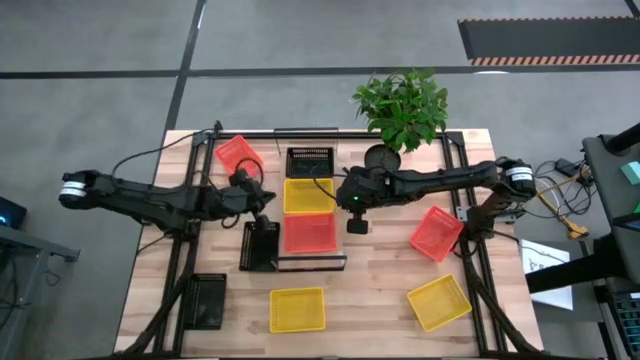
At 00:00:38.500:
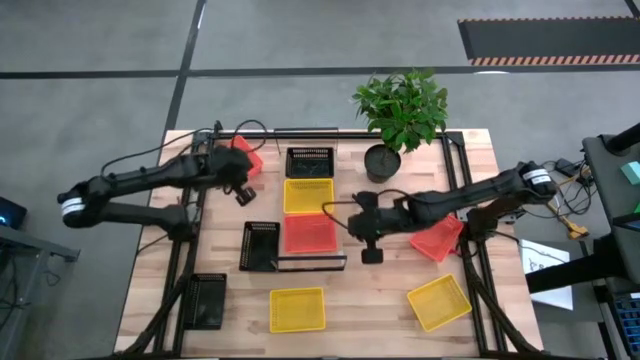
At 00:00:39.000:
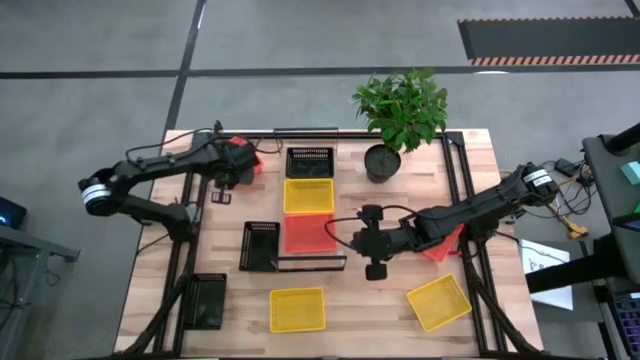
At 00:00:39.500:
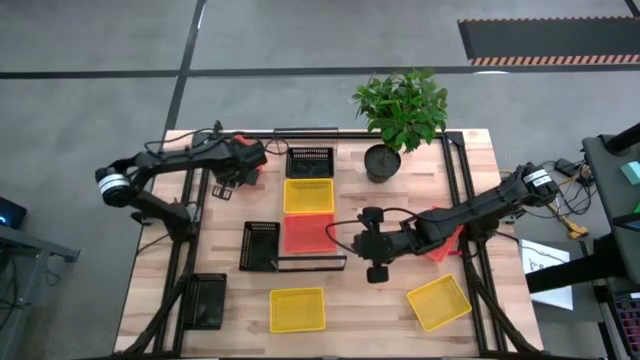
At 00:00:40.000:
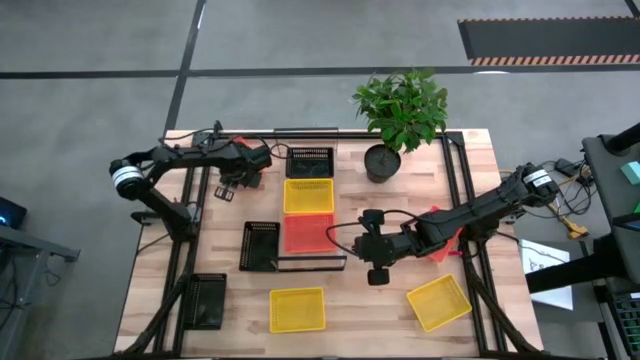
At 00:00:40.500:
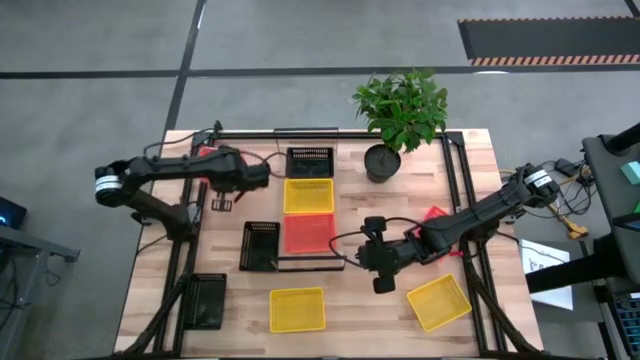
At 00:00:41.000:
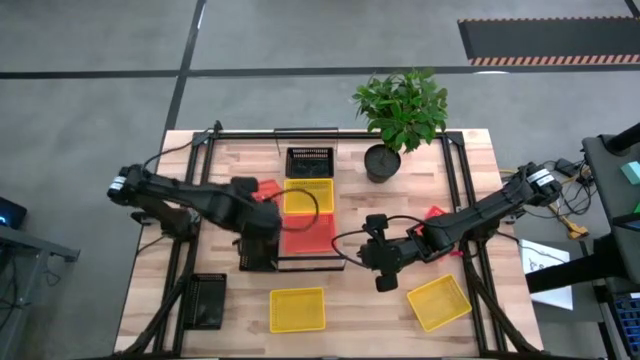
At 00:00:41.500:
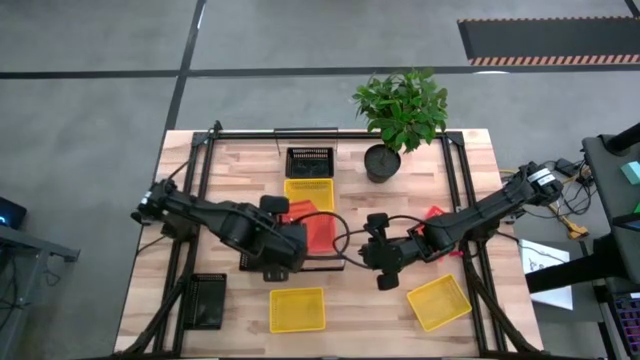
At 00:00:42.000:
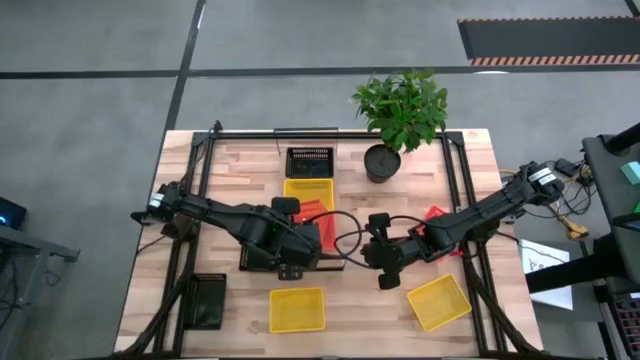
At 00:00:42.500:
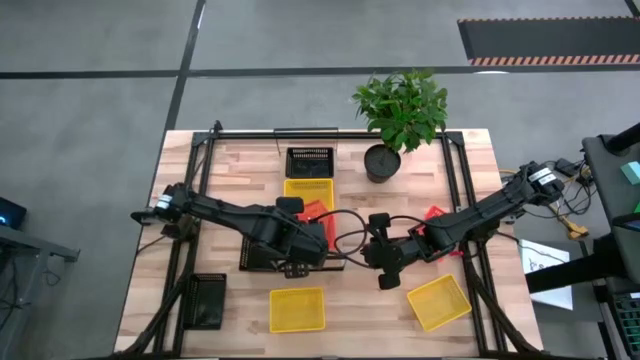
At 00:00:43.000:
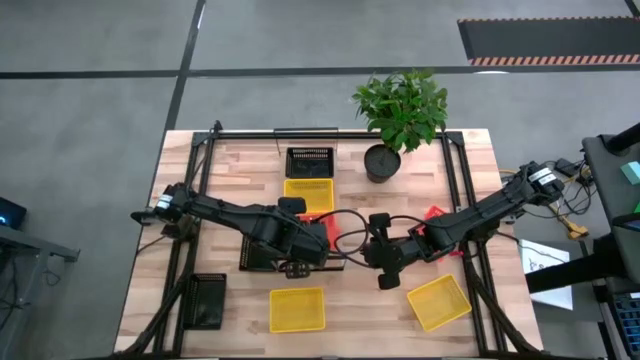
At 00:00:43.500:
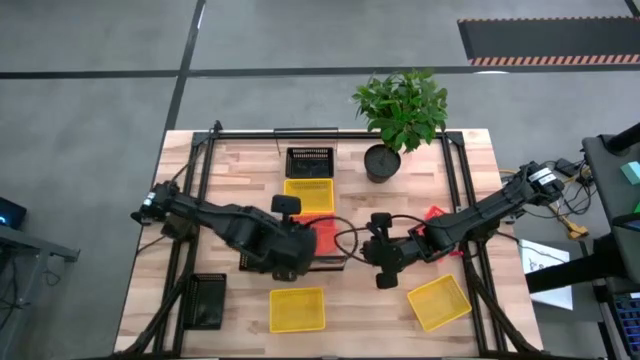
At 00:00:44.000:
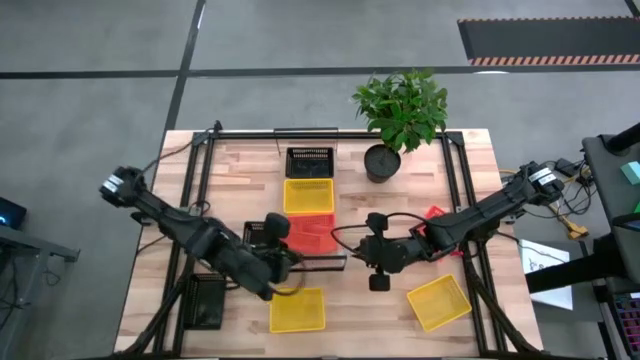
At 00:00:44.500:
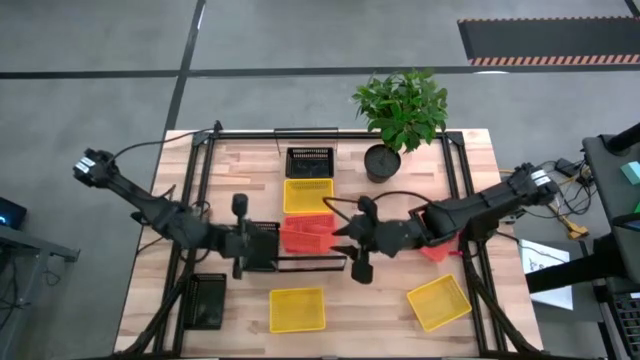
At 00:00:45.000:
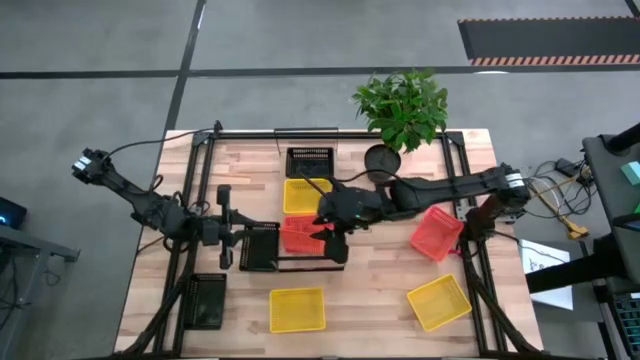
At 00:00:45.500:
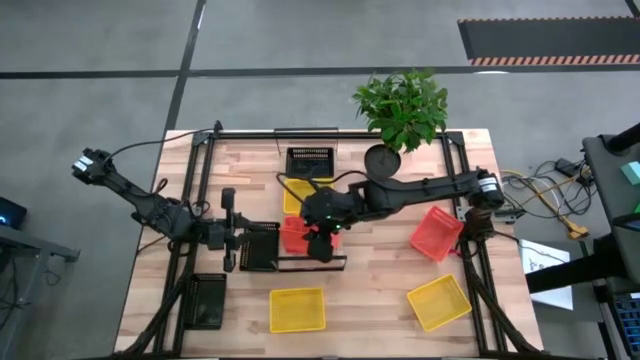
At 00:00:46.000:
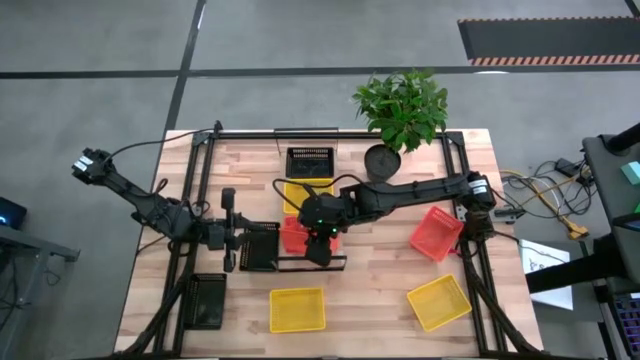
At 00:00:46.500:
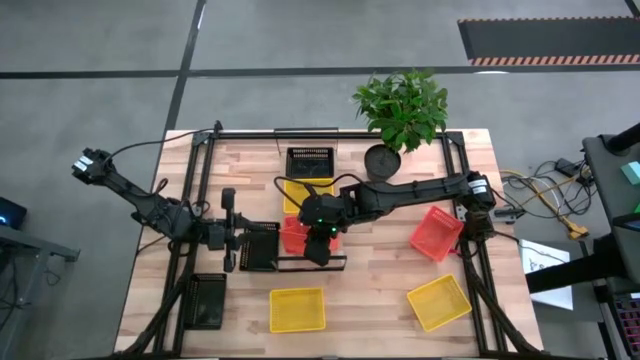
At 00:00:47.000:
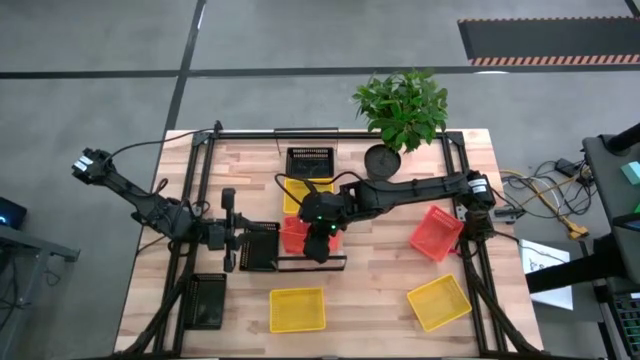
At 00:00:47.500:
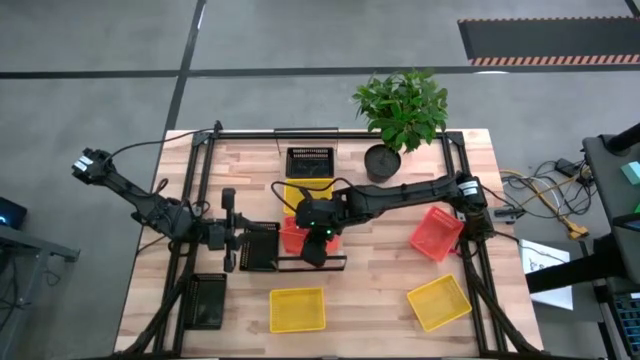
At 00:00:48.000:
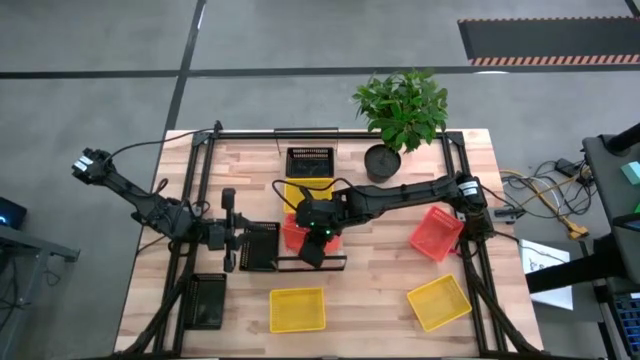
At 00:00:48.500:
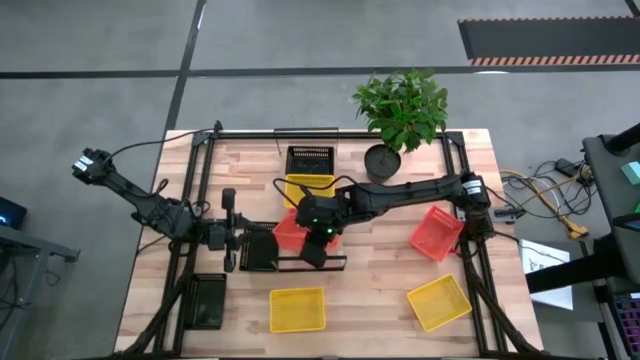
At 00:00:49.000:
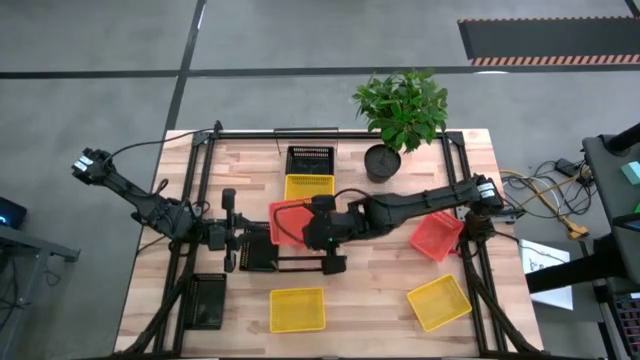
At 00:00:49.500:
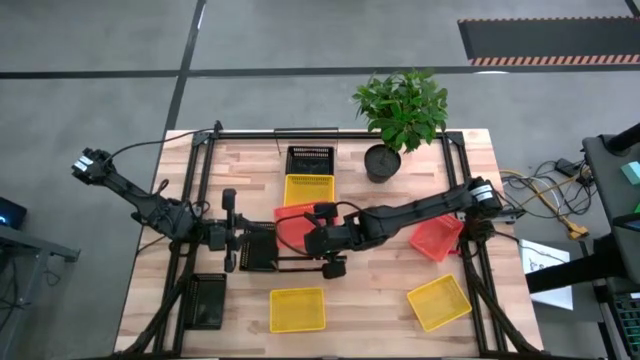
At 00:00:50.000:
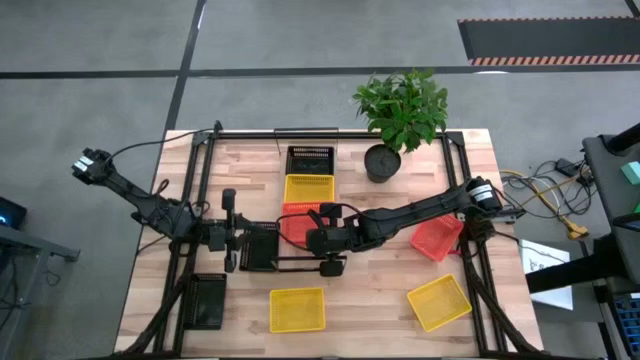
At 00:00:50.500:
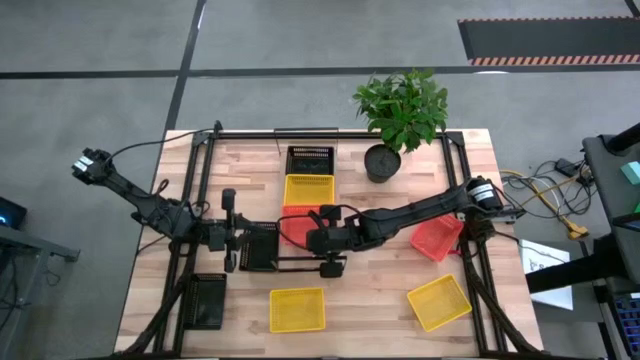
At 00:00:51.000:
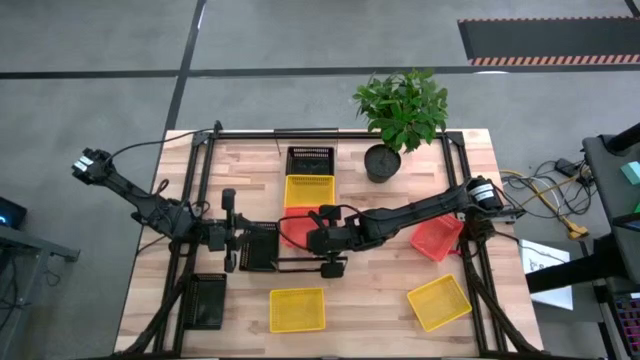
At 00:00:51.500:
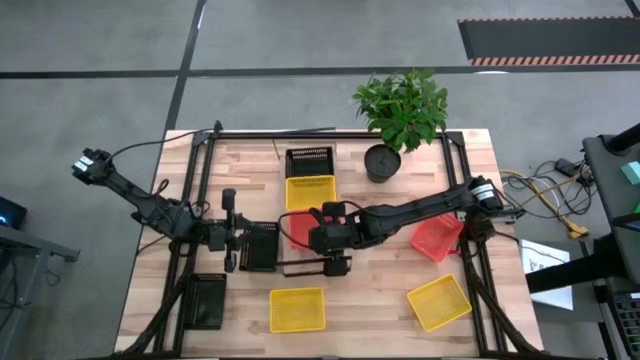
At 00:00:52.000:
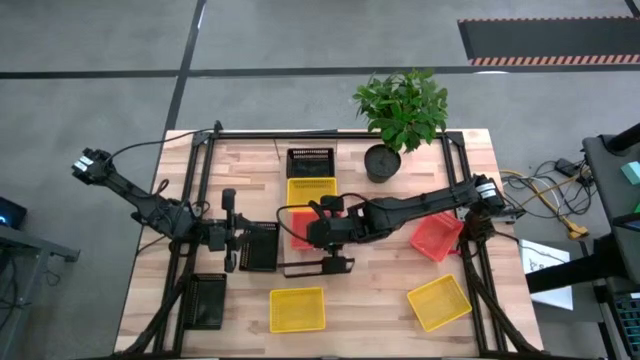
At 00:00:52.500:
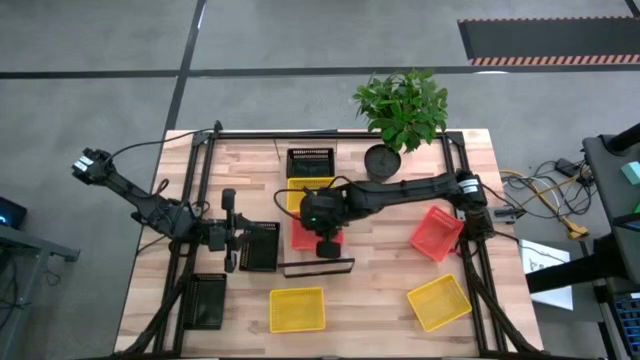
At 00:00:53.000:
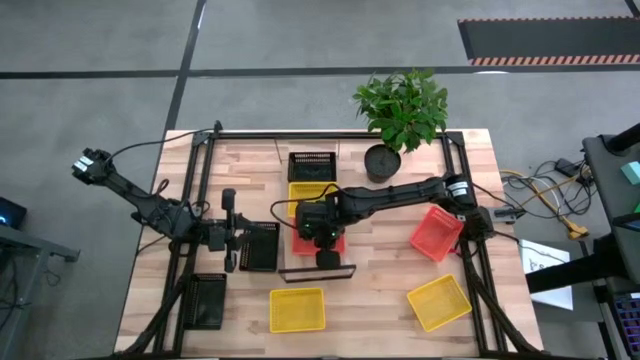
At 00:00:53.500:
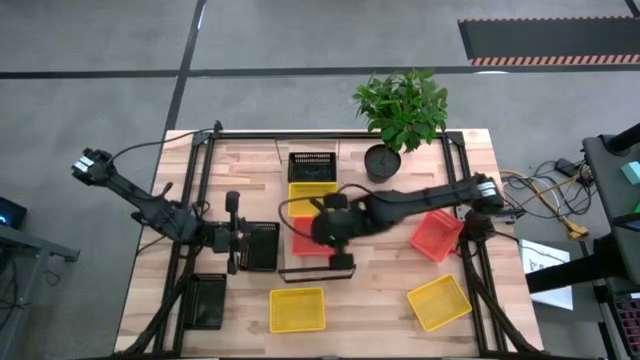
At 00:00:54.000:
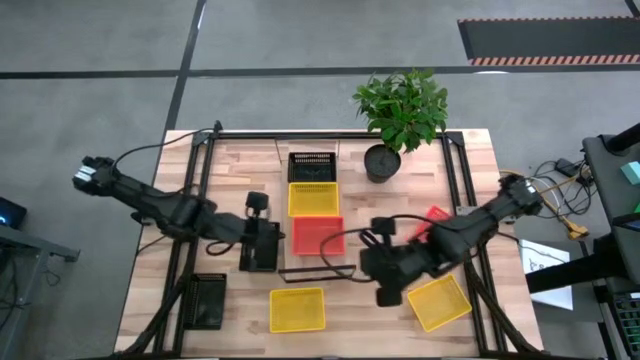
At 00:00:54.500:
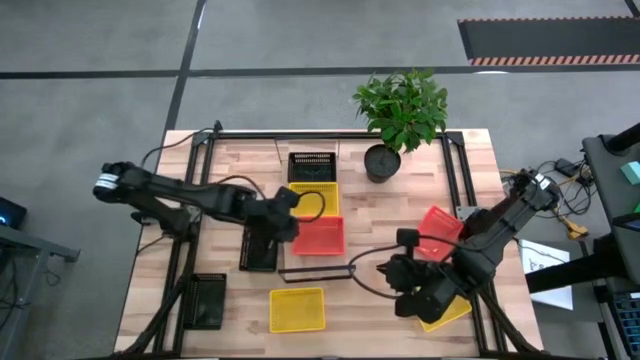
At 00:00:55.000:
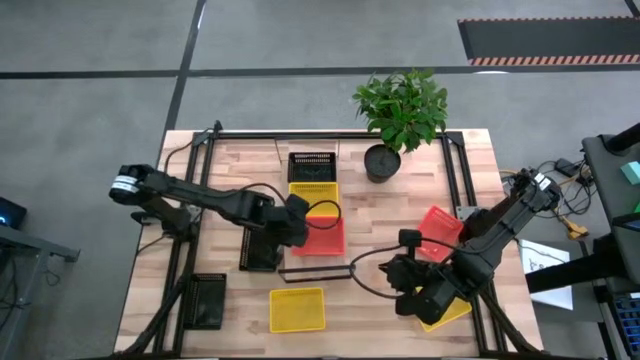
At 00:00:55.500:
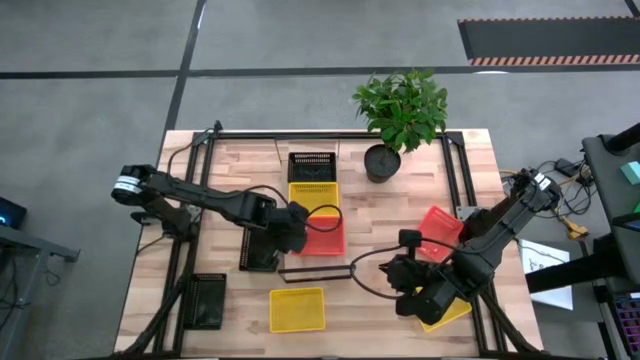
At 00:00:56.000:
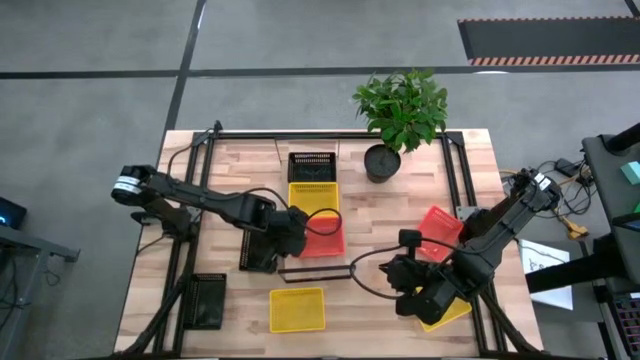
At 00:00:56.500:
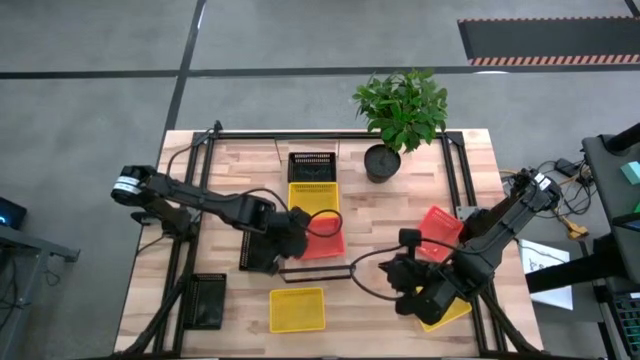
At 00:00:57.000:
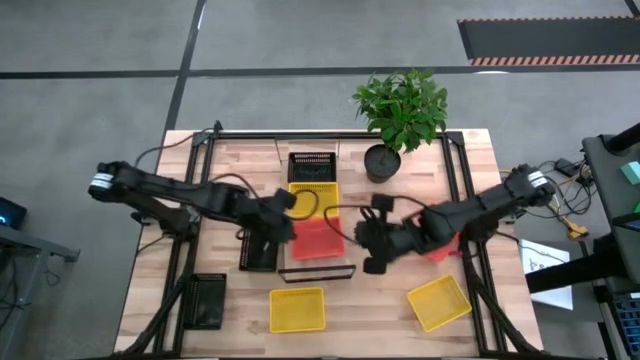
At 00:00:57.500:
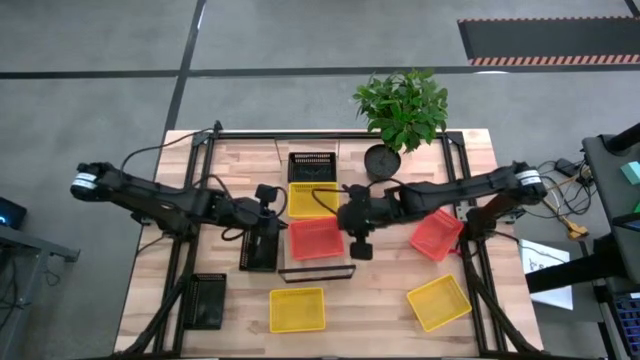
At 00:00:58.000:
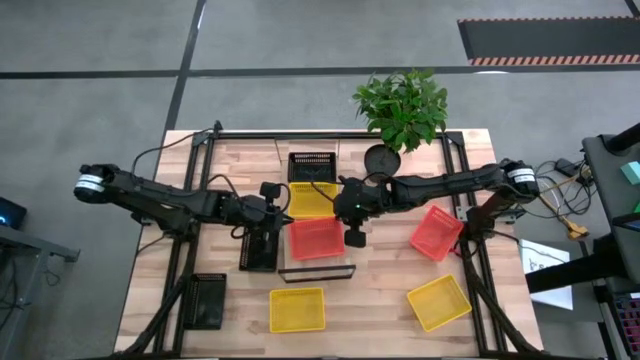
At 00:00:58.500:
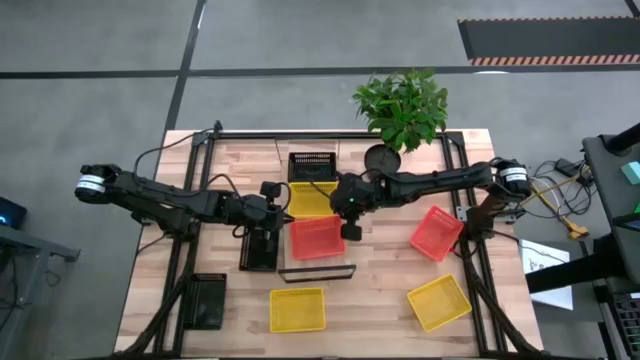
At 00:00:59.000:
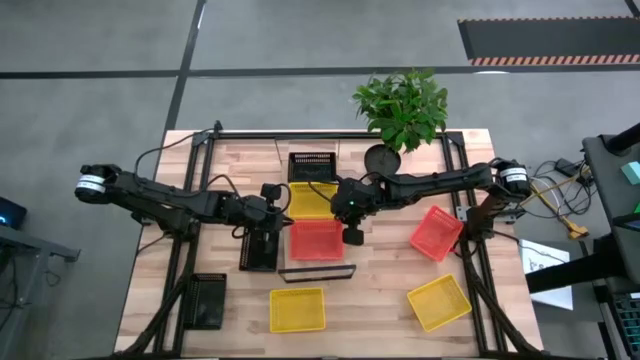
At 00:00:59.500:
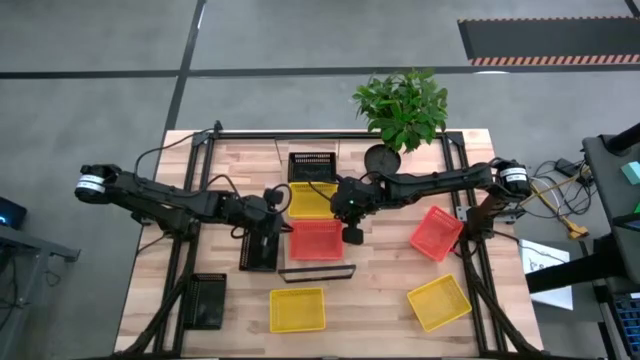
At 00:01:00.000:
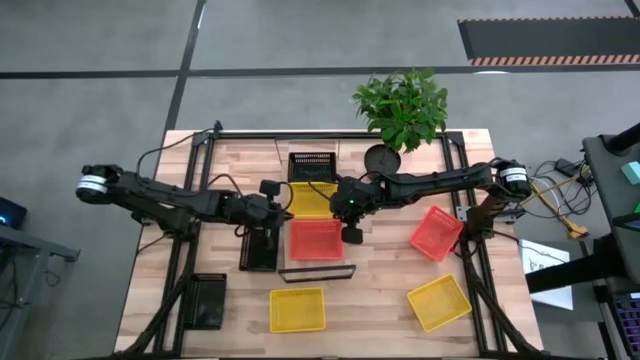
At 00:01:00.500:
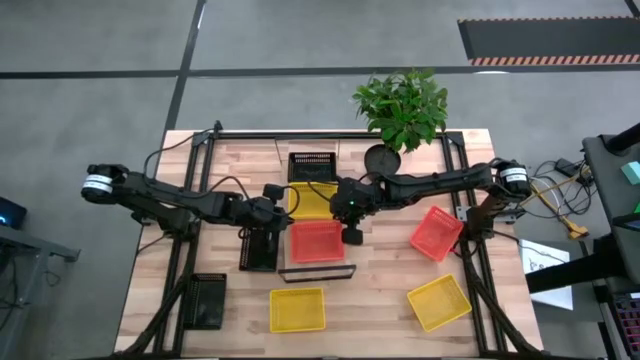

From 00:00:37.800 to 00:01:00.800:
Task: Stack baskets on shelf by color
Stack the top orange bin on top of the other orange bin on the shelf
